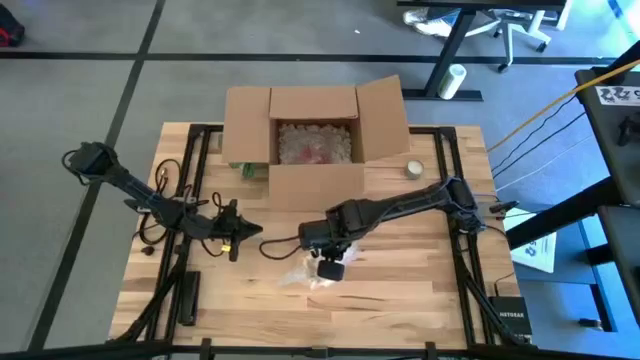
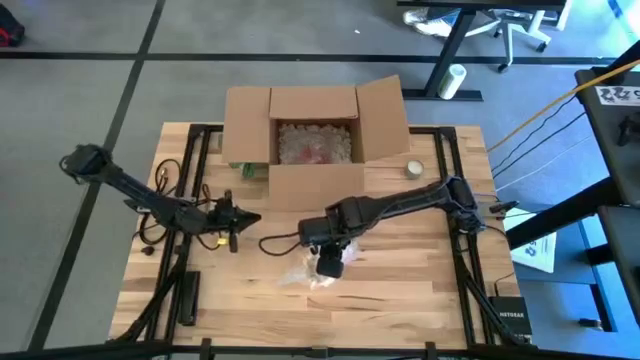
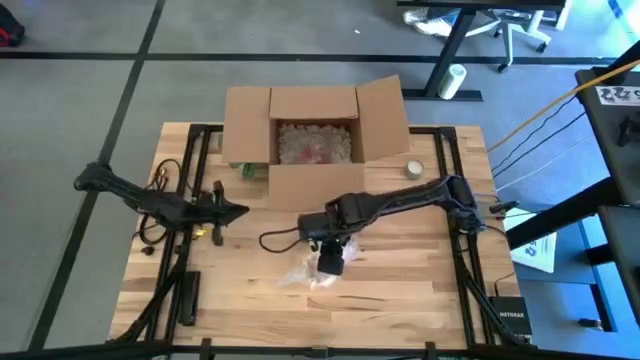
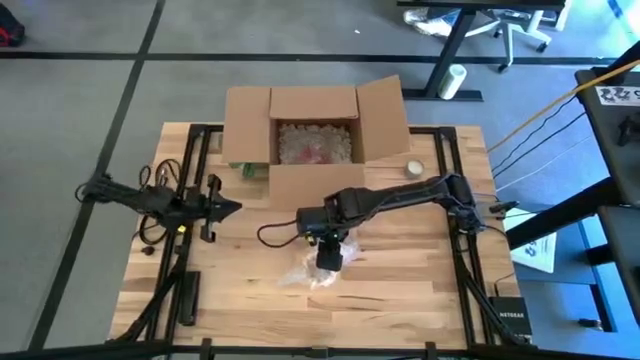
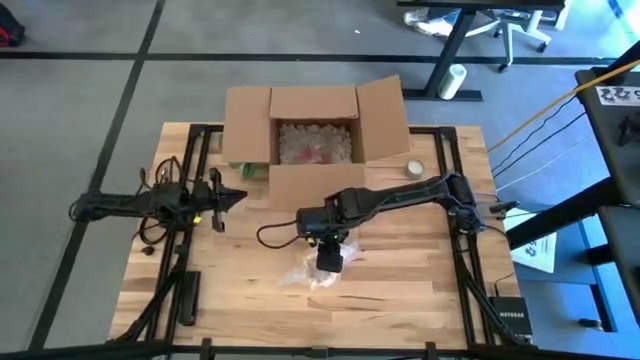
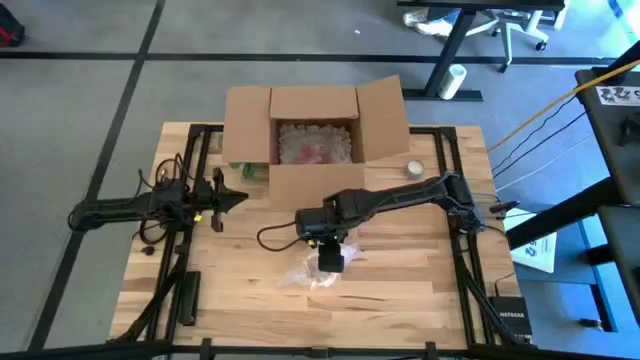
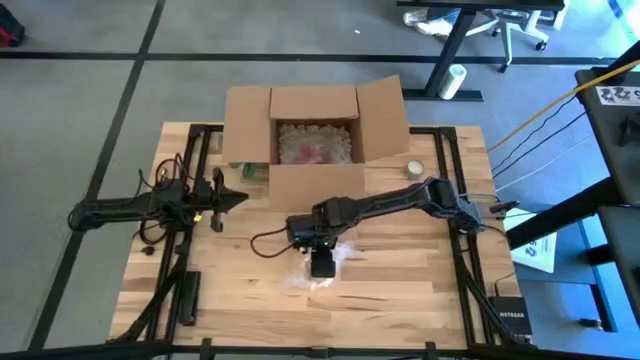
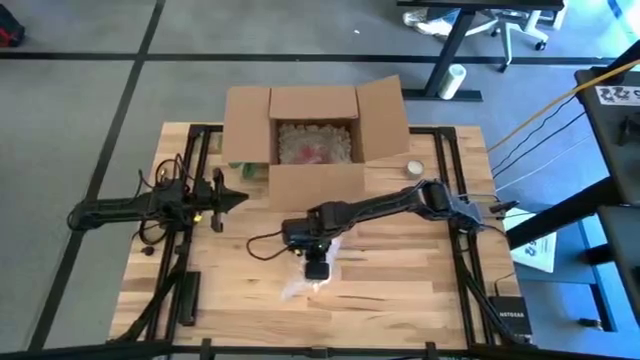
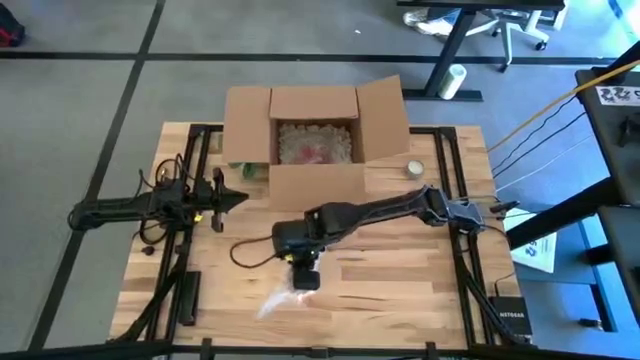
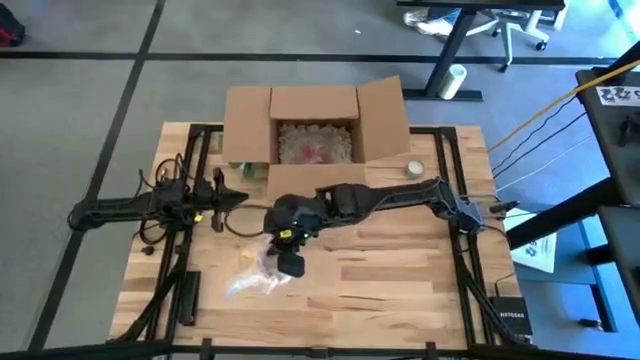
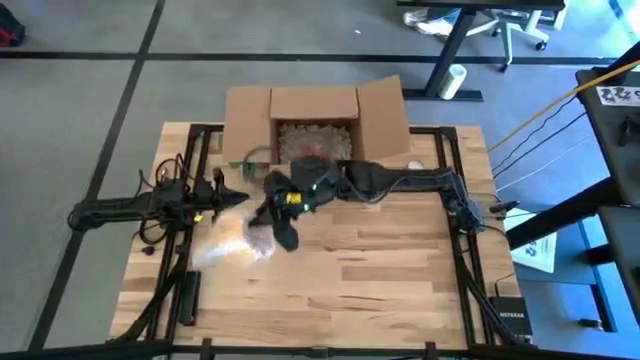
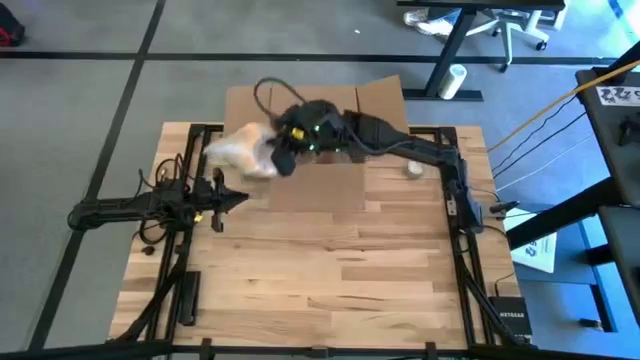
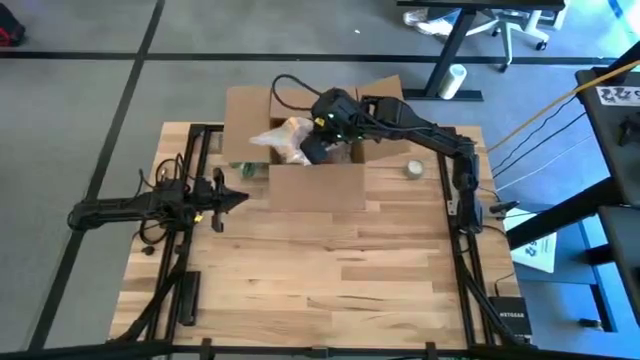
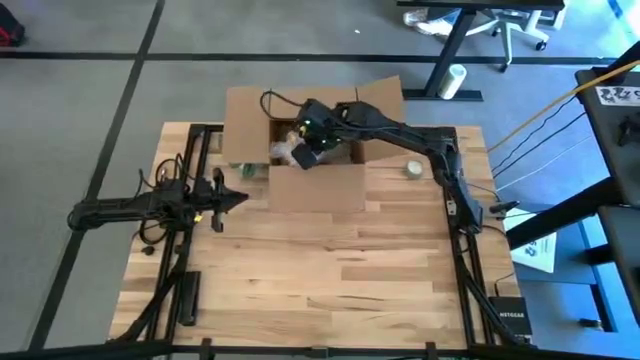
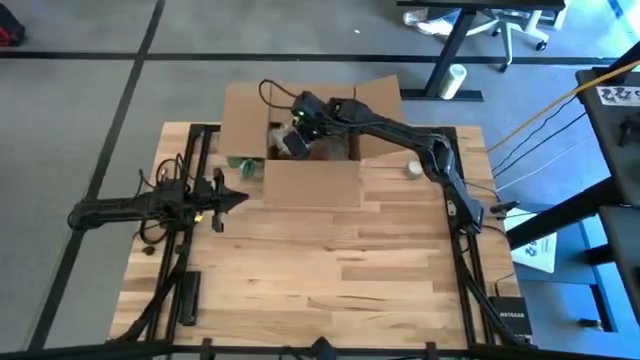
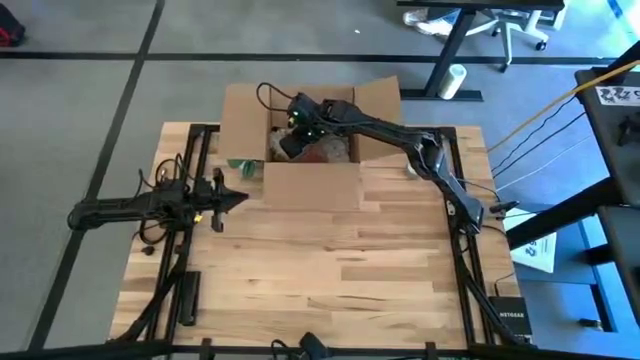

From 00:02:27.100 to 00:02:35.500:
Task: wrap mug
Put the wrapped yellow cup into the cardboard box

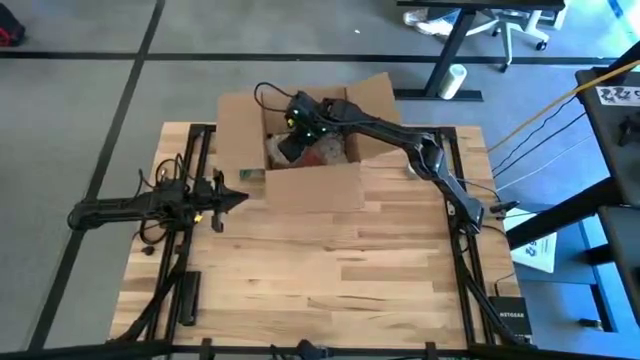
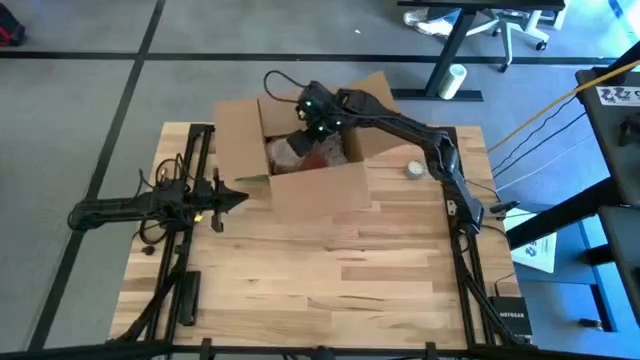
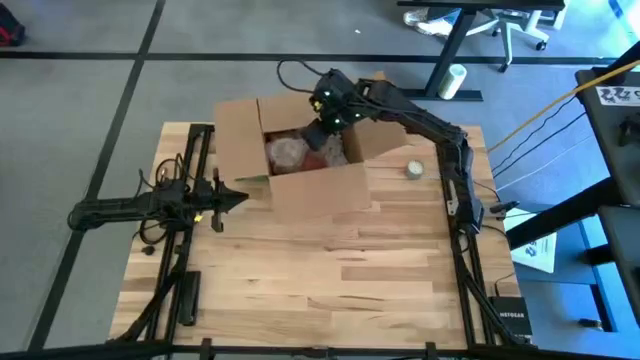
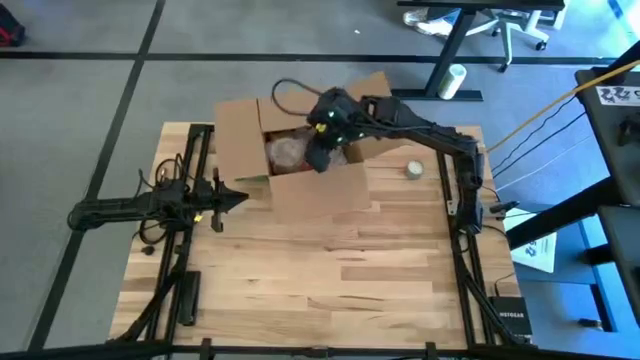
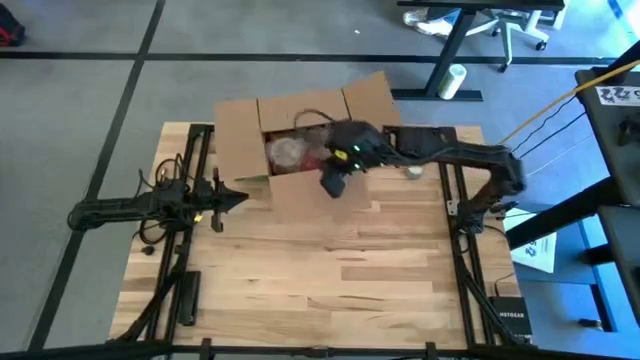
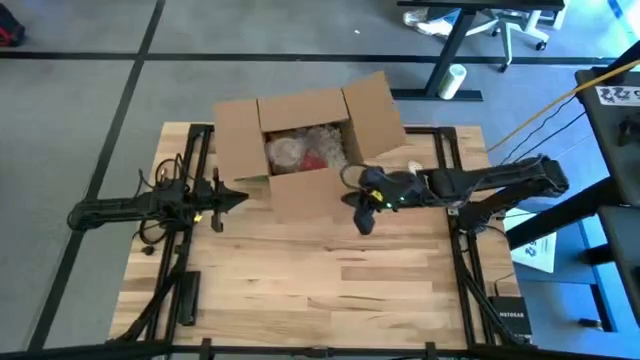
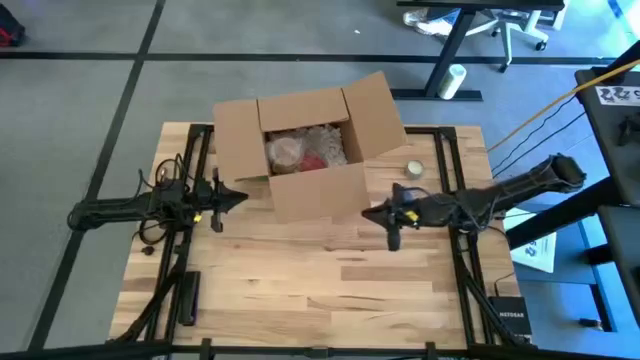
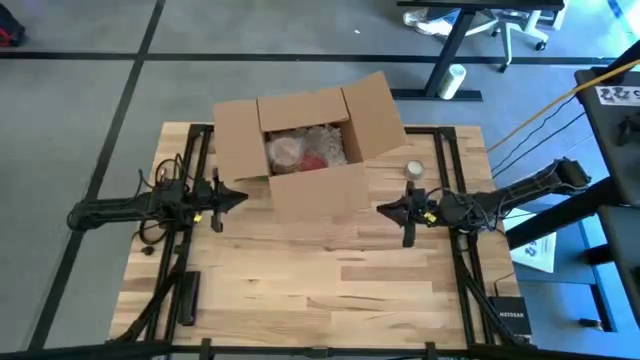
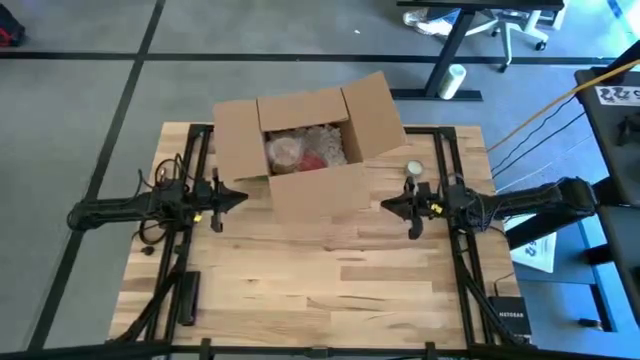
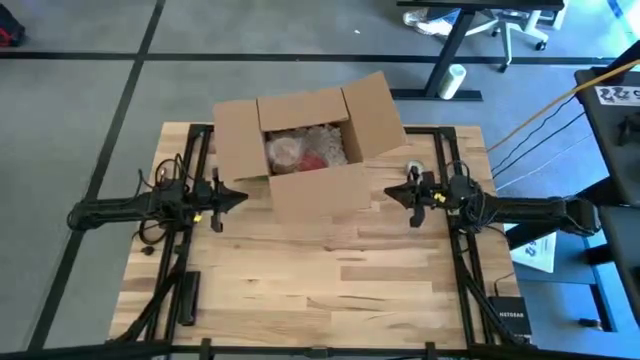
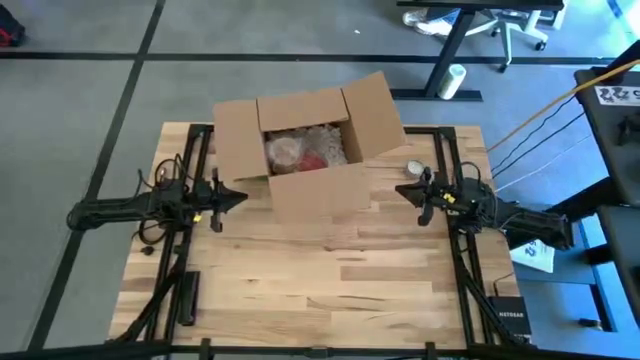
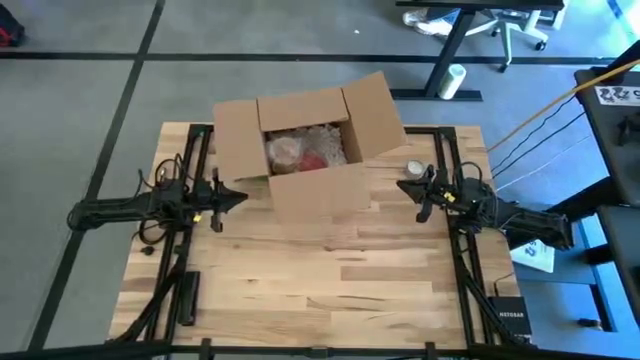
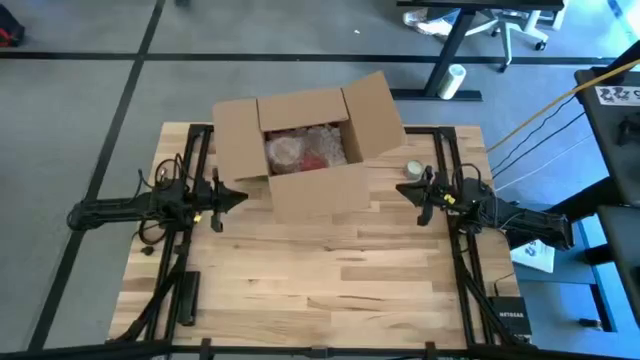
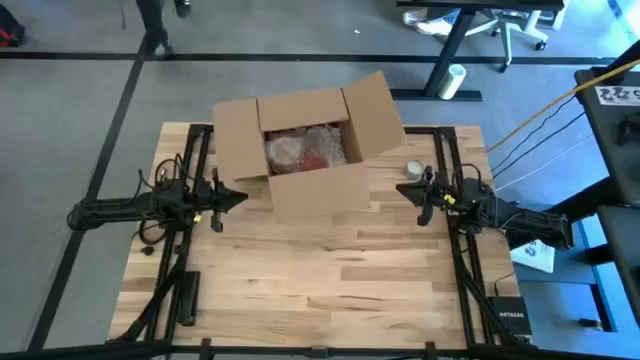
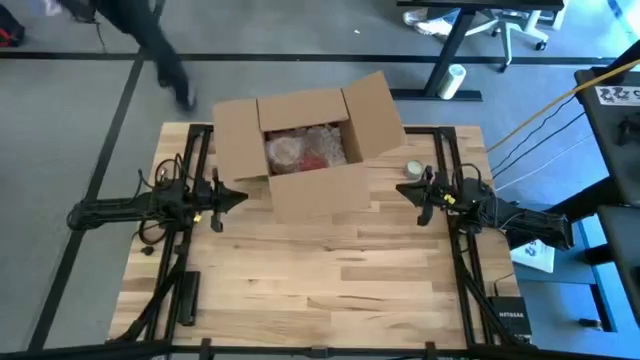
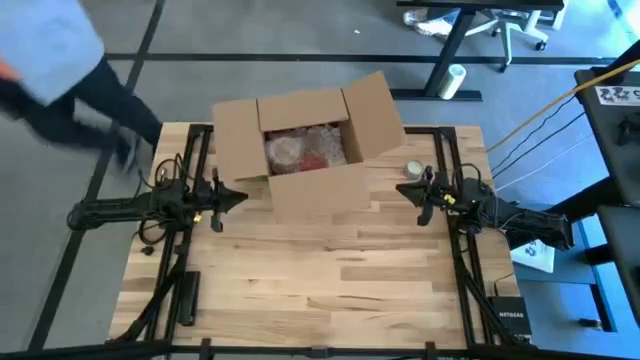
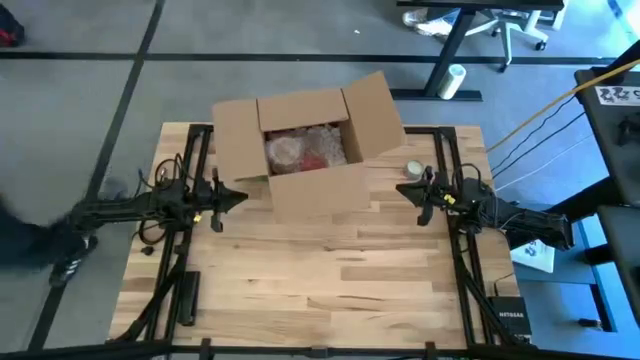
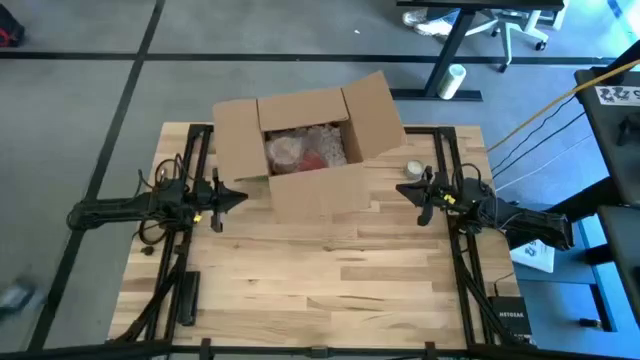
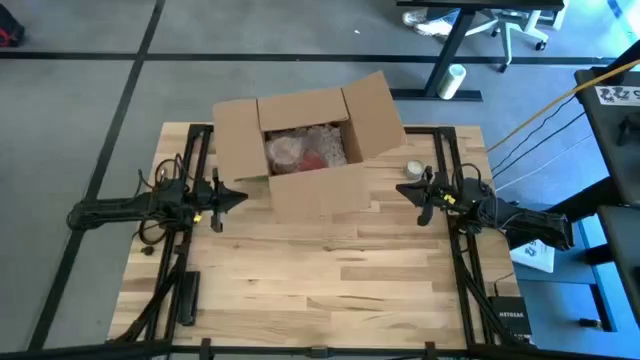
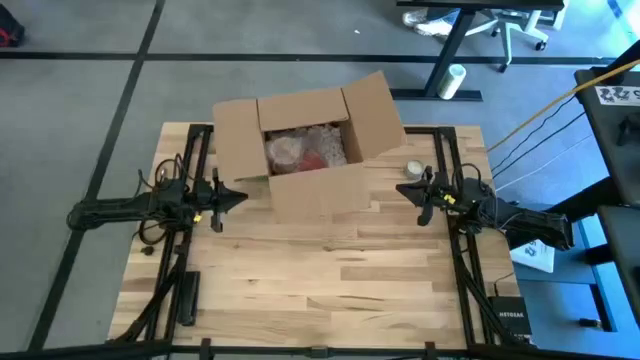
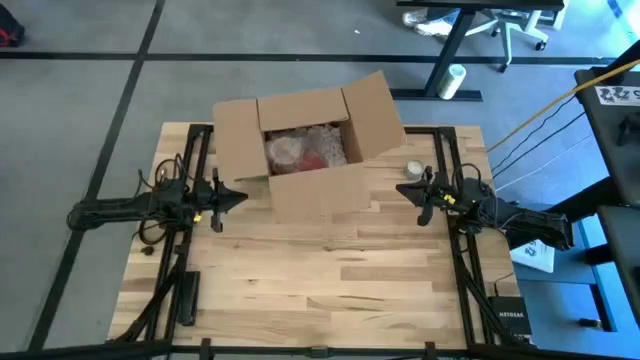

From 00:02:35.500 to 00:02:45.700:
Return to Home Position

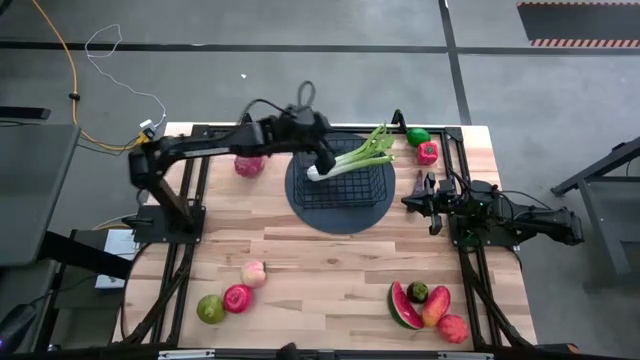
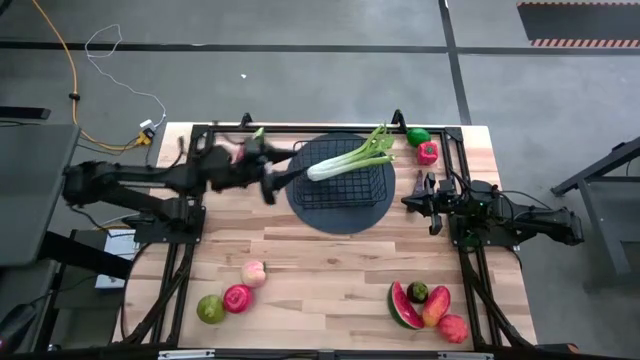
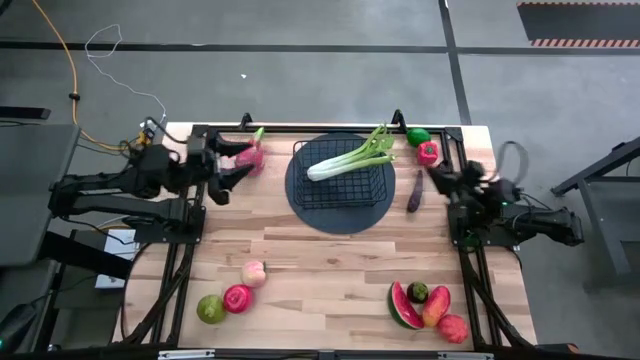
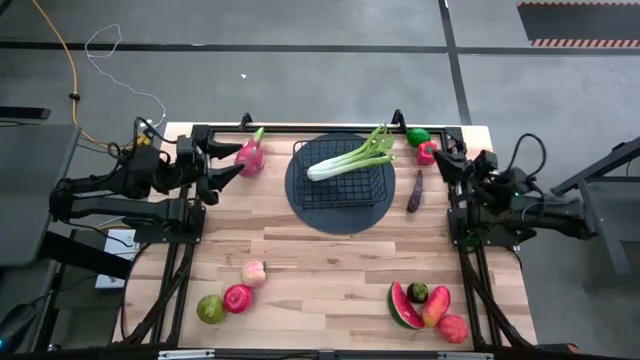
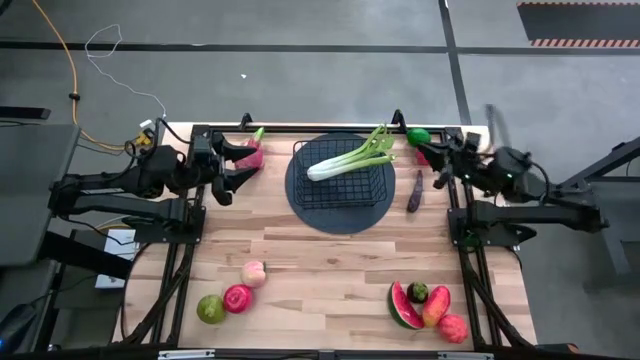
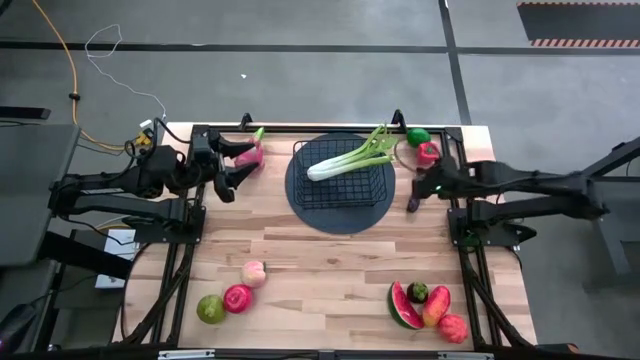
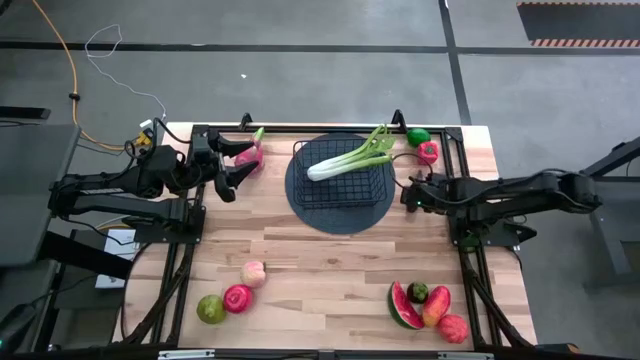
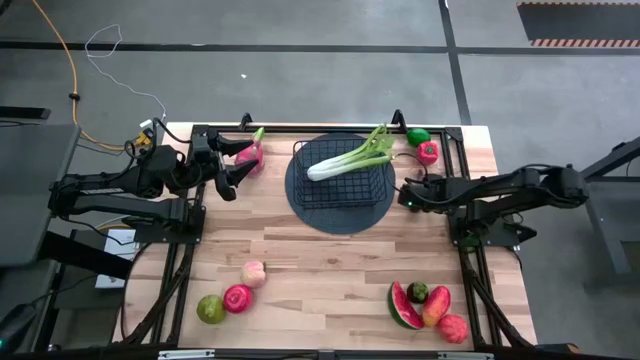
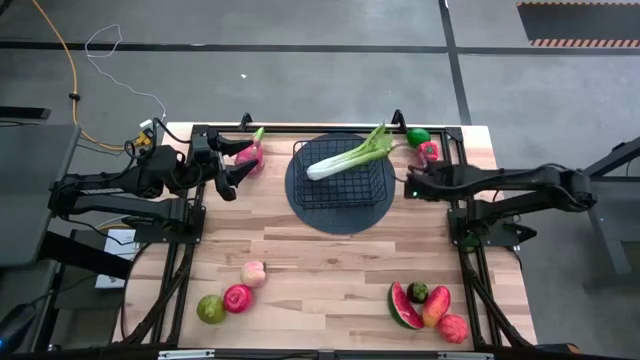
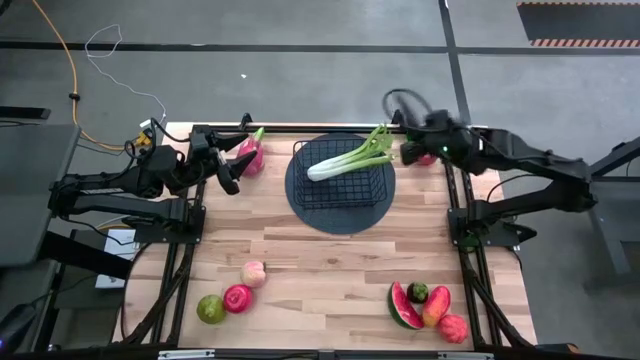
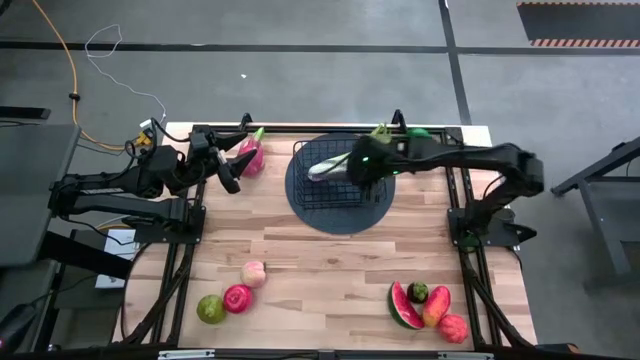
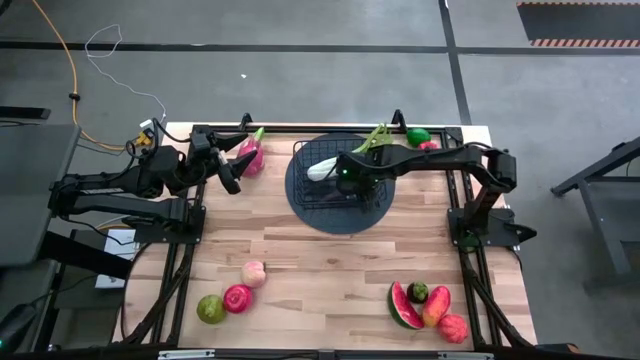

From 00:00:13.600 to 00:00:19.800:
Task: Build produce basket
Put the eggplant into the wire basket
